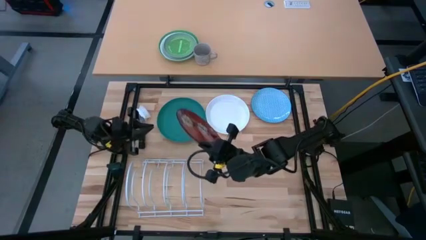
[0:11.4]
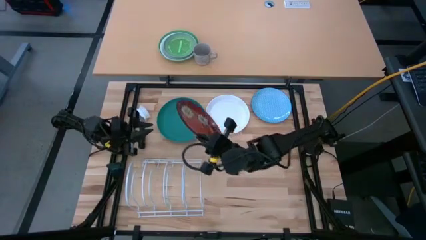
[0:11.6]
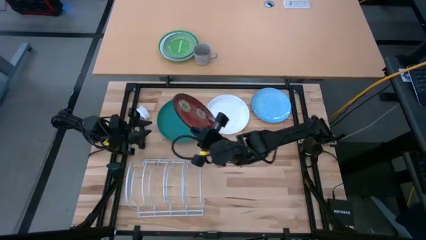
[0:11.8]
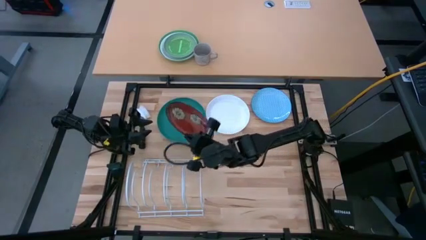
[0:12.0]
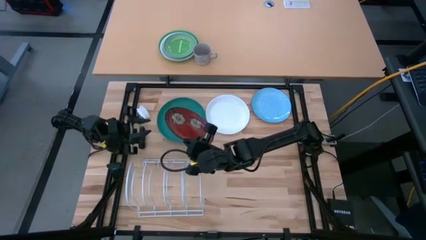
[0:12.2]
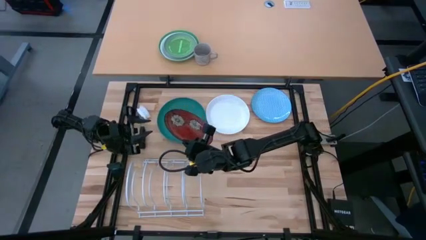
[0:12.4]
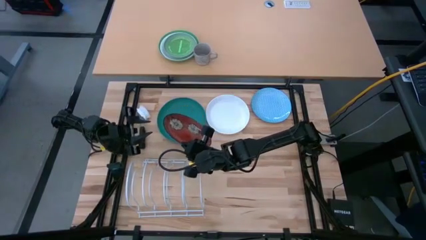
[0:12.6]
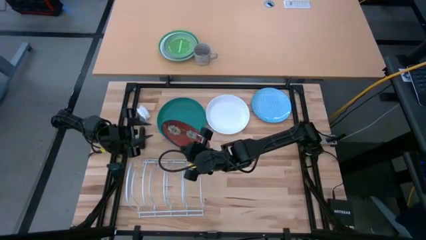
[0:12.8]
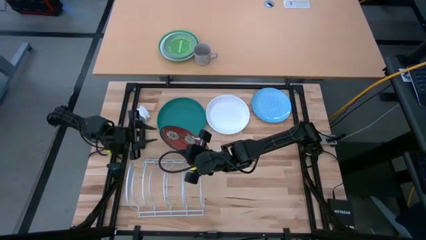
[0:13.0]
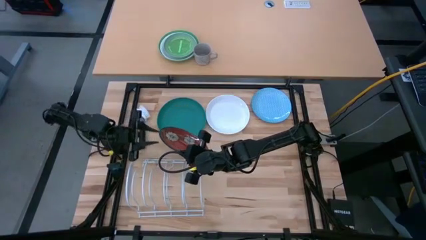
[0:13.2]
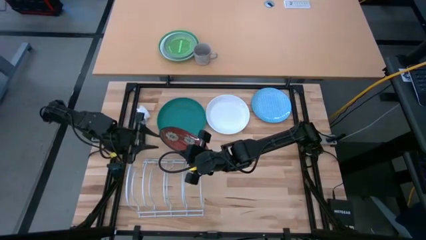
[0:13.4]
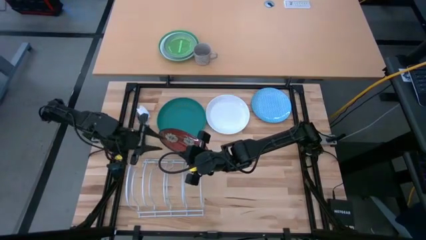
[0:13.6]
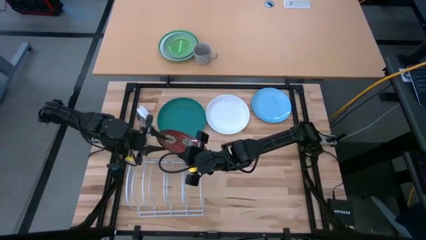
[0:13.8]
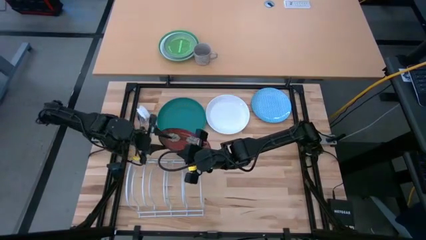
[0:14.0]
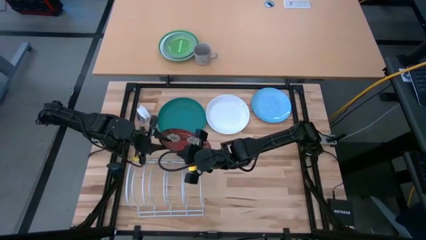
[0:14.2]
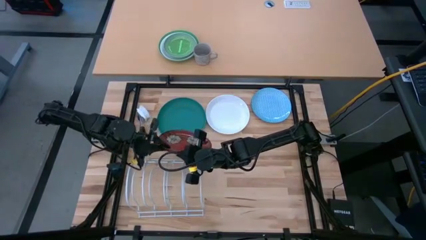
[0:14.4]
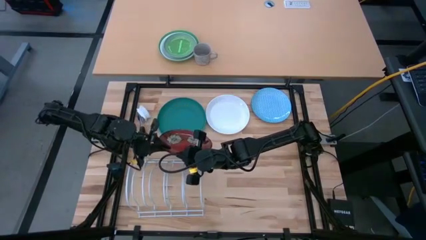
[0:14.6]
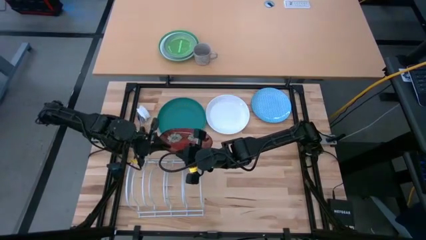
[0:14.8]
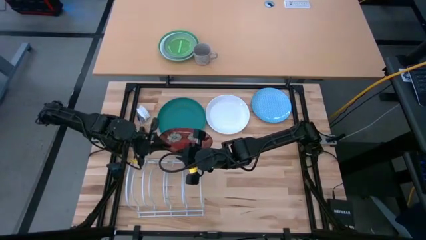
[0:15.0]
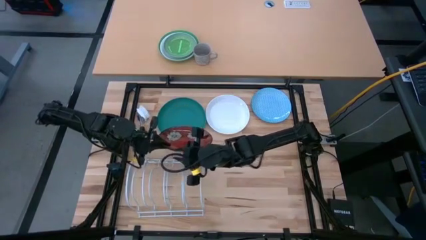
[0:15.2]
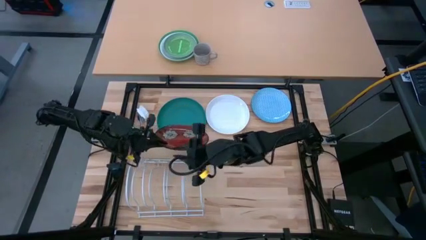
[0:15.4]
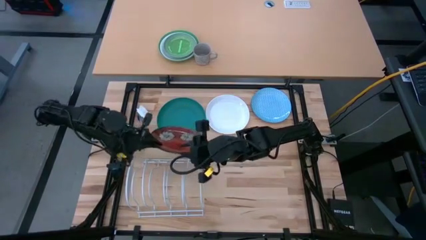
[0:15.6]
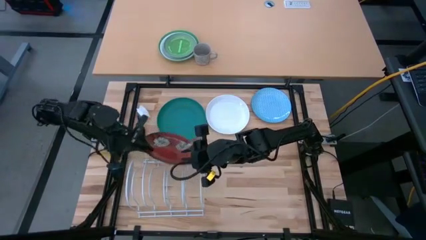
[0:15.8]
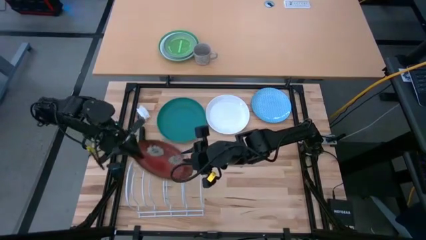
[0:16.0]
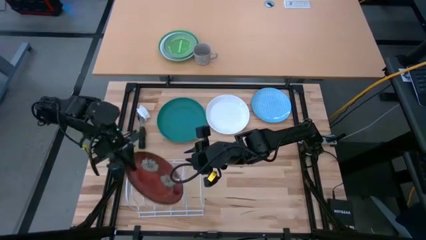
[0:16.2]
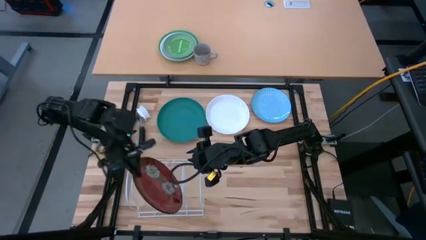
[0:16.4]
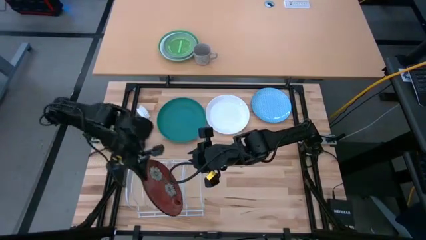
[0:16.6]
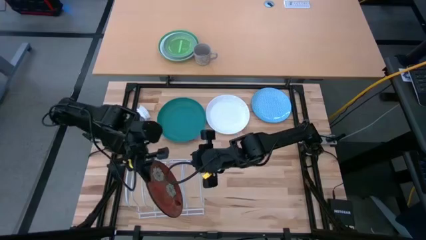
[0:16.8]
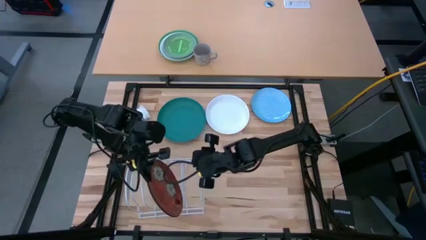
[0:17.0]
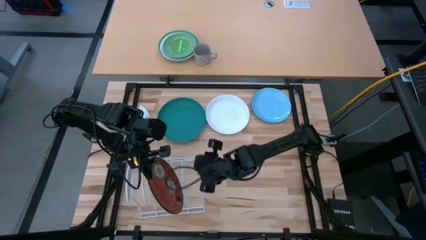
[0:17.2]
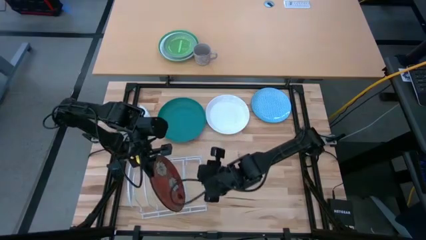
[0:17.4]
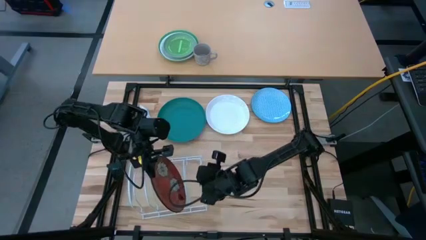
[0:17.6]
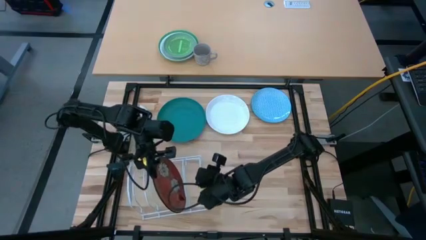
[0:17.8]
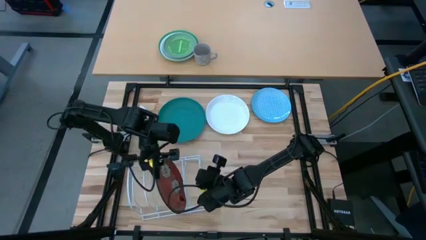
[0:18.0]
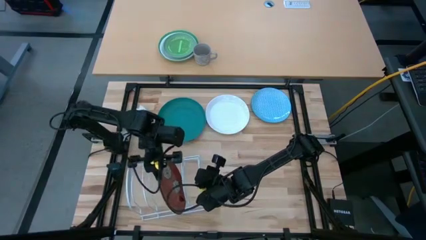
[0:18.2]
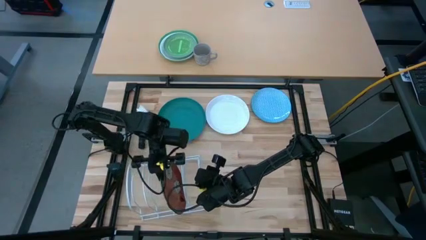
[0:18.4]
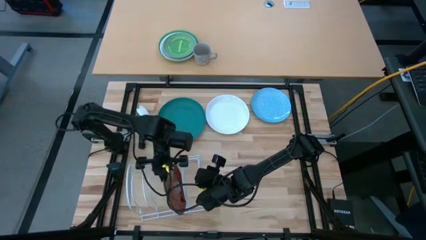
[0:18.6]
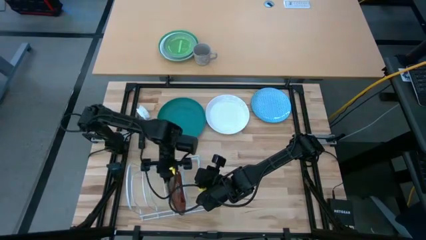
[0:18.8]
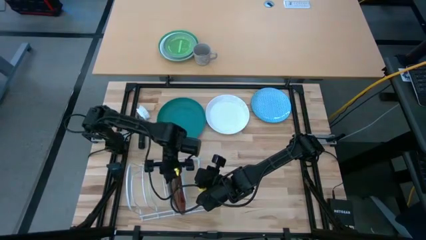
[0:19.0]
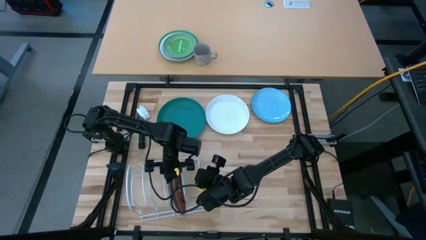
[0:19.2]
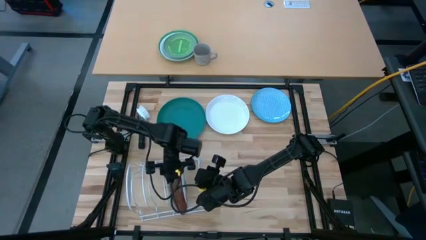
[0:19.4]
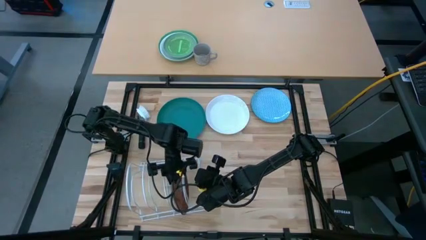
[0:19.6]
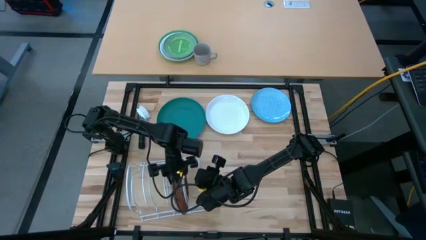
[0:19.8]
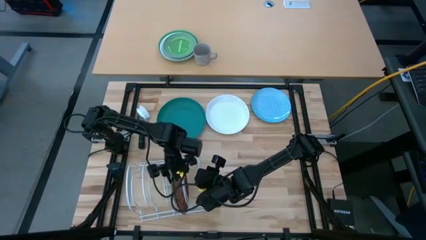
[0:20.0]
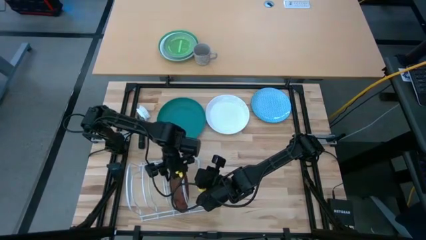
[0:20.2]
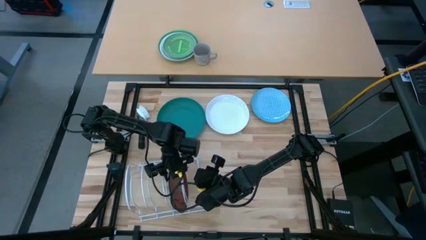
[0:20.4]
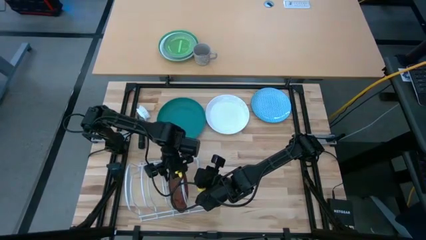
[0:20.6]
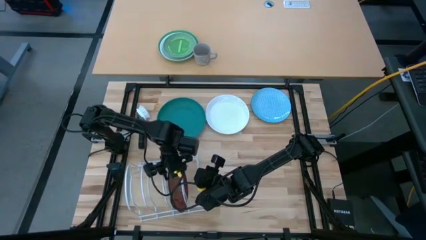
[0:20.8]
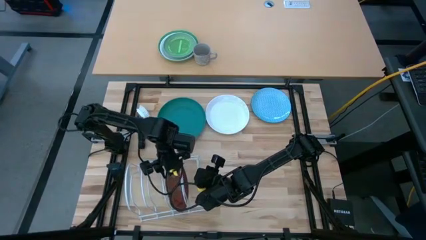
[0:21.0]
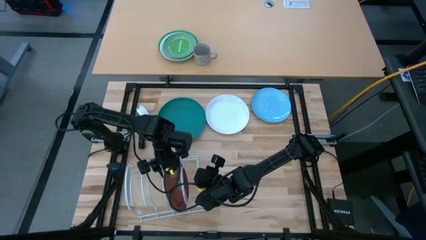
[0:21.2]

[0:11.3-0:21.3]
Task: Sort dishes
Put the red plate into the dish rack

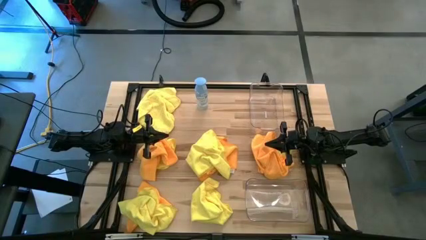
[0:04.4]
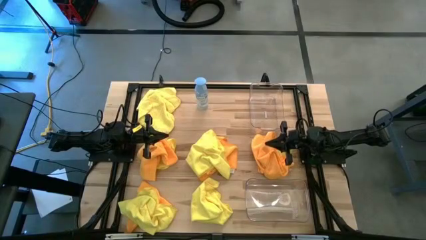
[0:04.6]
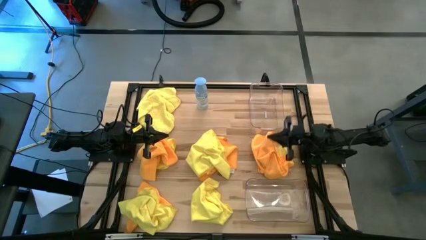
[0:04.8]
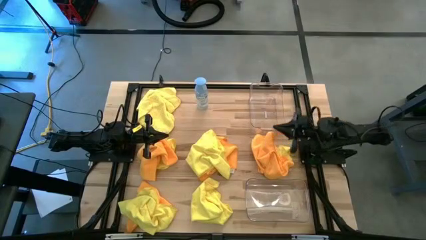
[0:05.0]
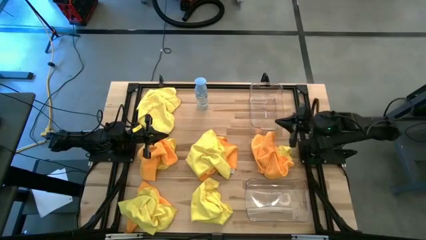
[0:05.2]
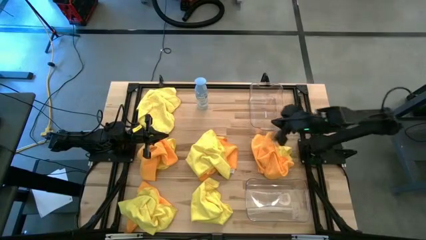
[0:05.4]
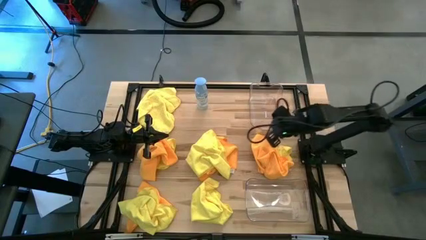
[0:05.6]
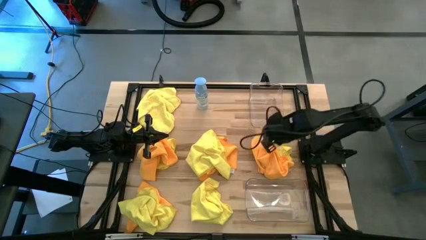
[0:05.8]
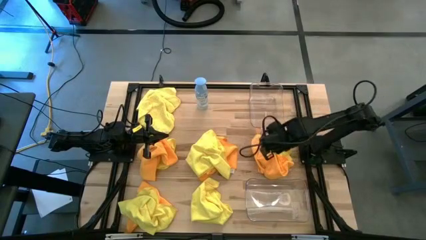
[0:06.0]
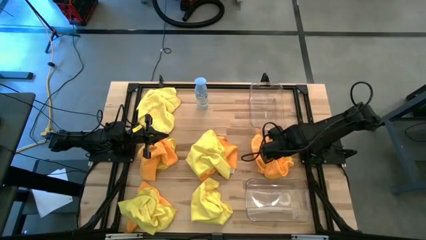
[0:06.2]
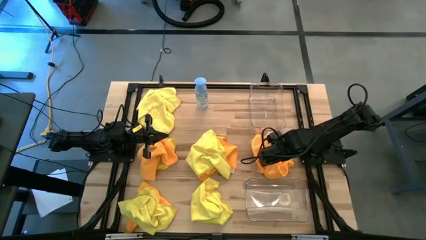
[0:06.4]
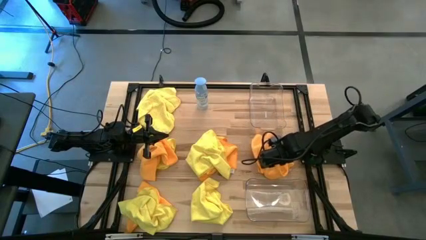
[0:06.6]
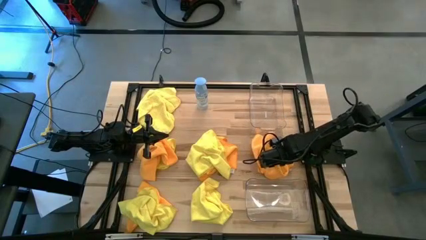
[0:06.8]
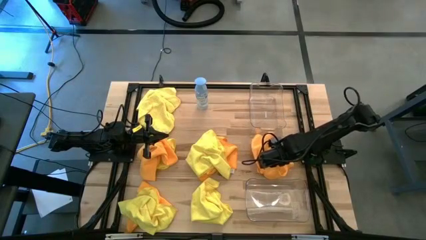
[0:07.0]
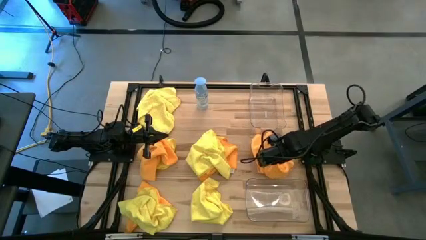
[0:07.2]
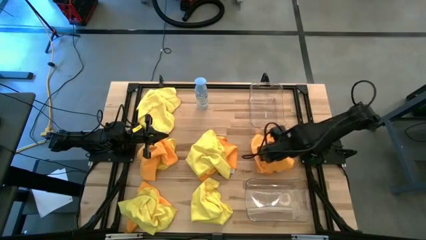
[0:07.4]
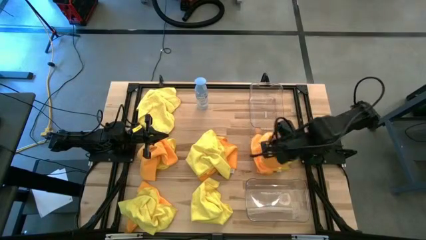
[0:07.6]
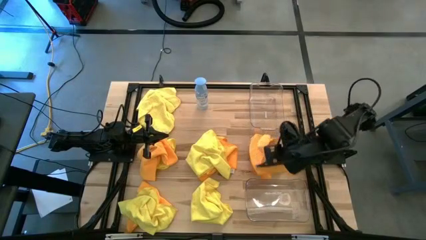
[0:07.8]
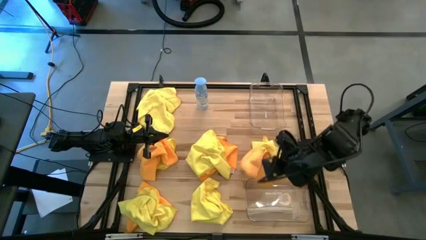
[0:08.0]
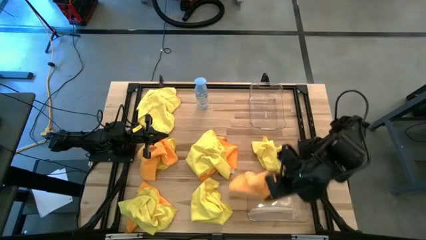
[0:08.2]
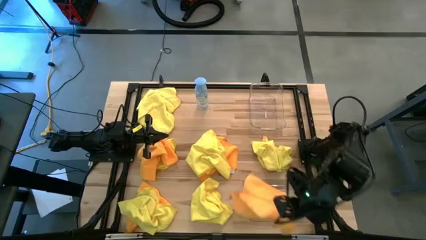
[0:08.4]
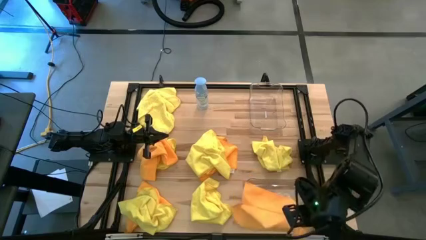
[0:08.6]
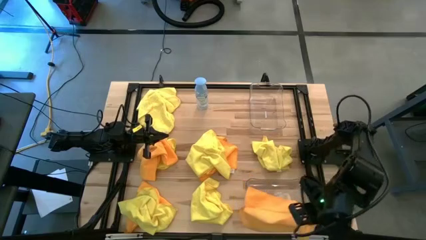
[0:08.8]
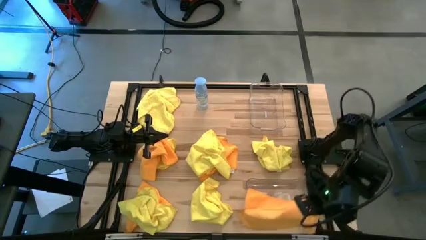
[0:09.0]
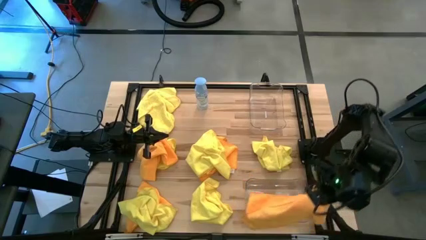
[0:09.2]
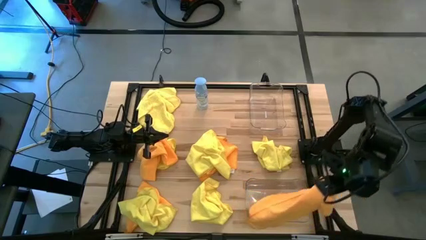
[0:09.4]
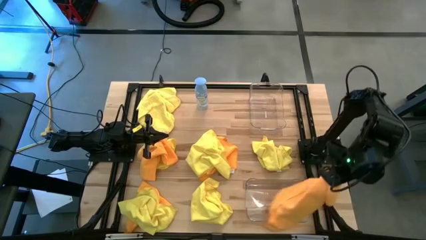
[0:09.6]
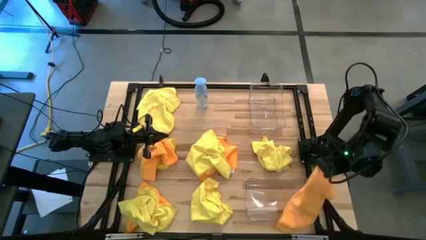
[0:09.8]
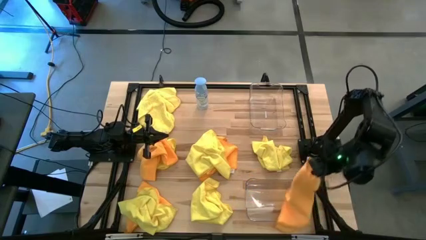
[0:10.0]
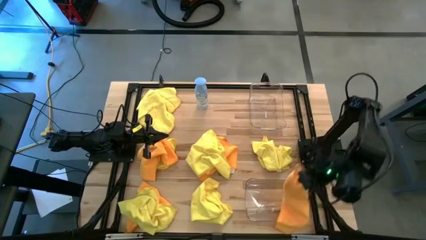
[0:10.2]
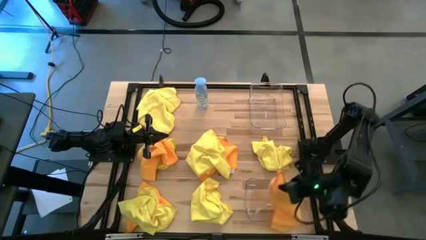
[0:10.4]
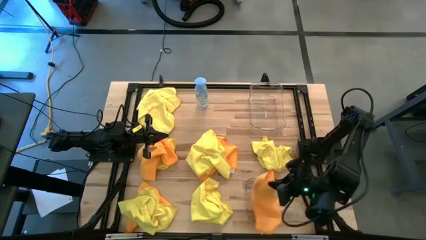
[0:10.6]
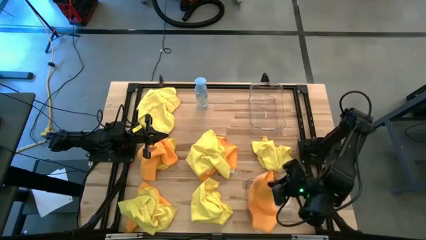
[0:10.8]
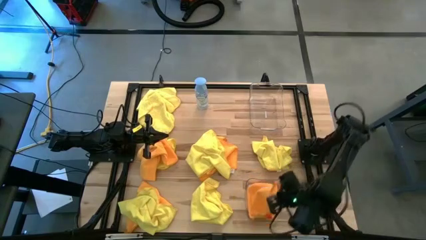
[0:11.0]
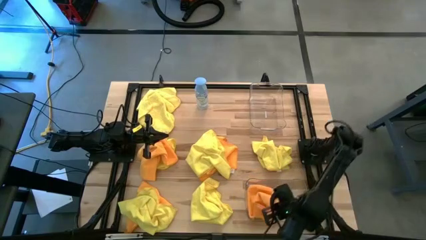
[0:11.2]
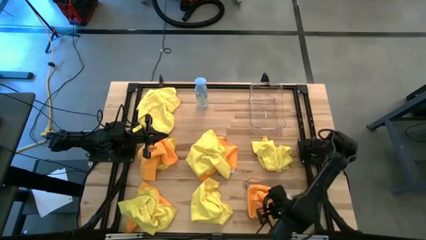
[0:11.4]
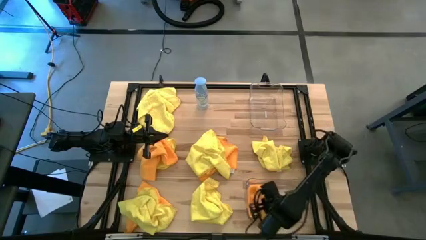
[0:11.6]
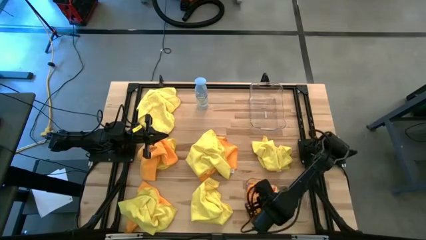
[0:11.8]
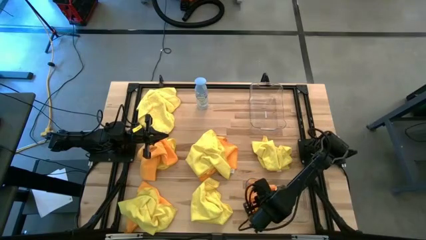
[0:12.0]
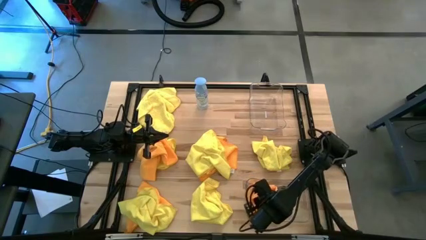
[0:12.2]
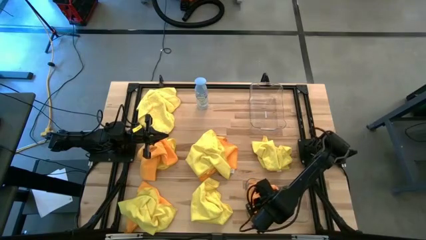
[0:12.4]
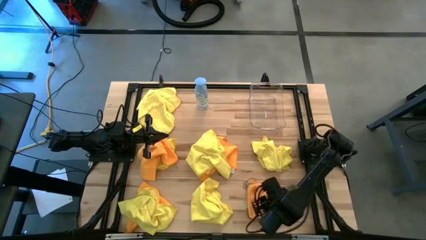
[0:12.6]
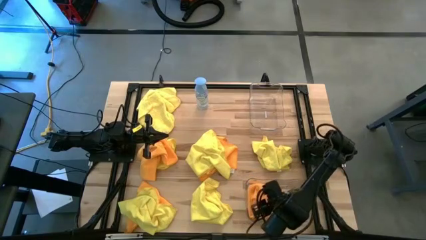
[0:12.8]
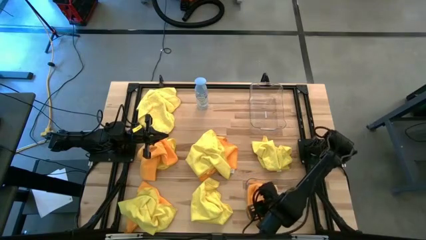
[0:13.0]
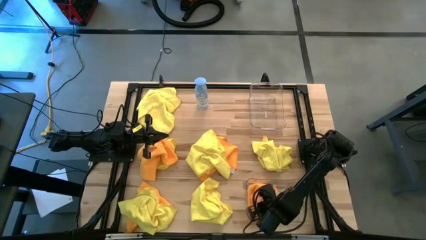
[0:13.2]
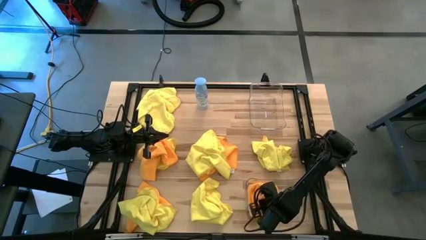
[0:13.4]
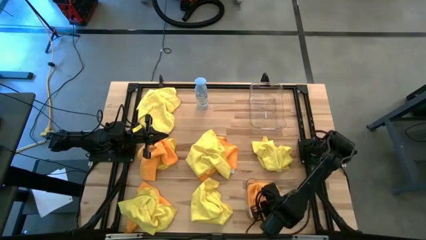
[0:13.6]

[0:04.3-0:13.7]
Task: Sort microfiber towel by color & place in baskets
Put the orange microfiber cloth into the bottom transparent bin
